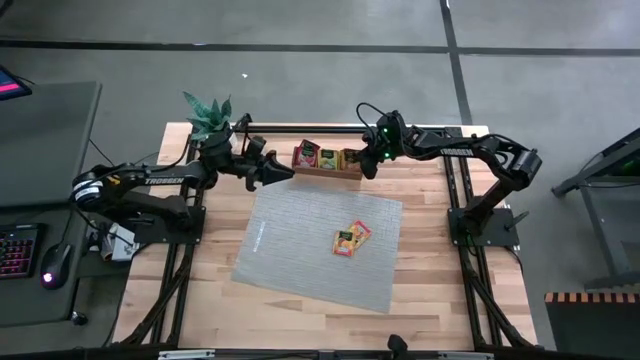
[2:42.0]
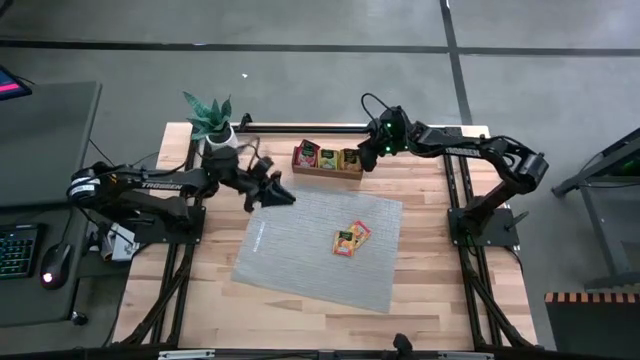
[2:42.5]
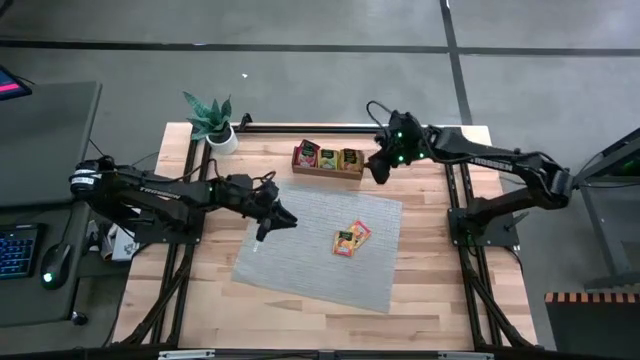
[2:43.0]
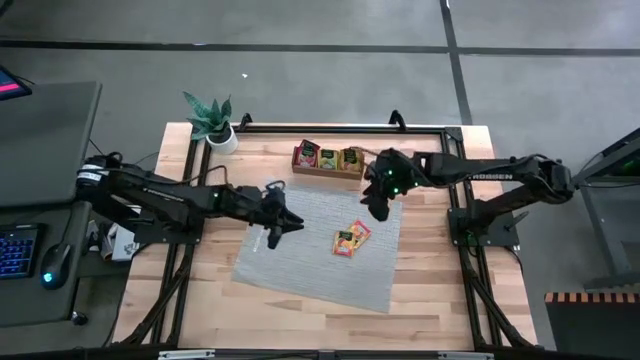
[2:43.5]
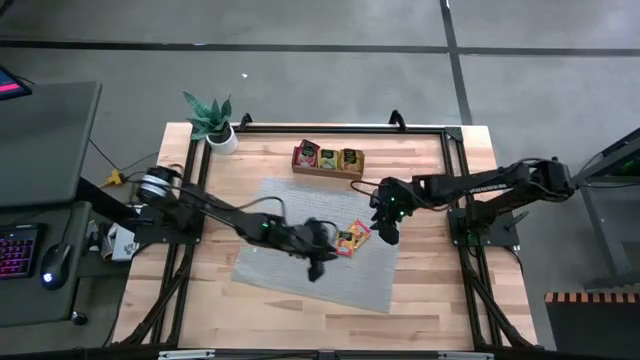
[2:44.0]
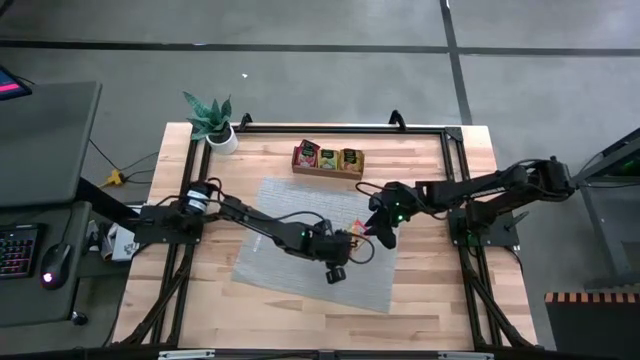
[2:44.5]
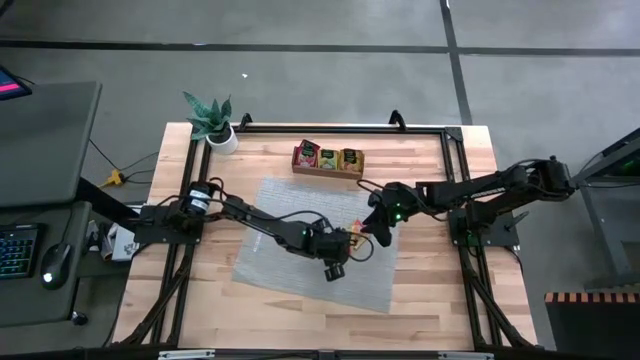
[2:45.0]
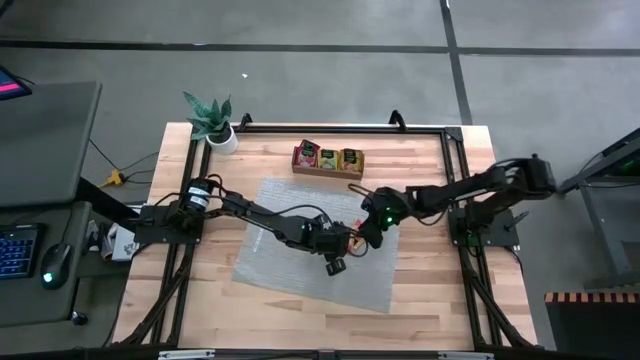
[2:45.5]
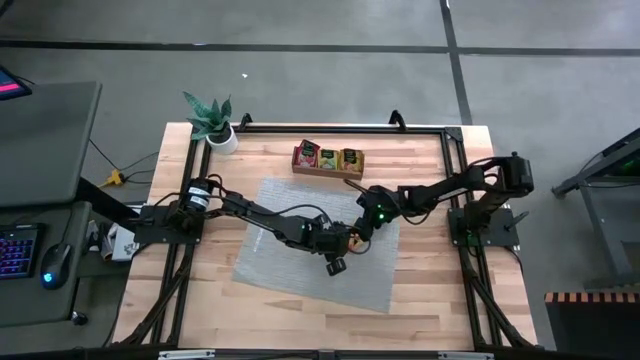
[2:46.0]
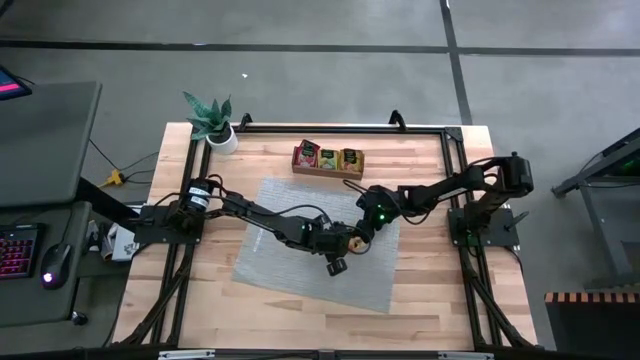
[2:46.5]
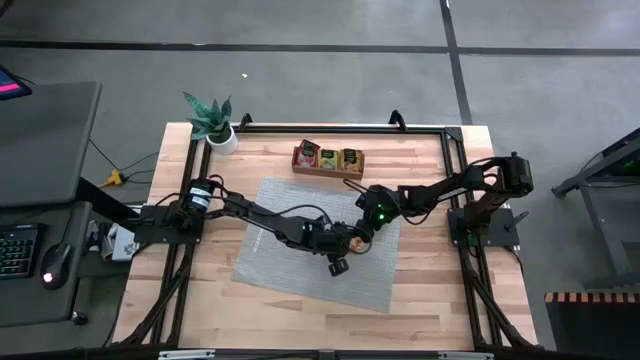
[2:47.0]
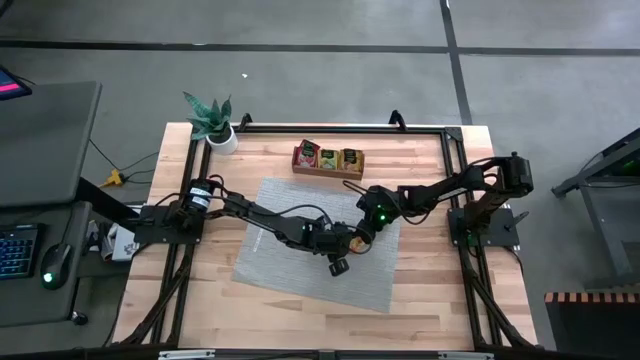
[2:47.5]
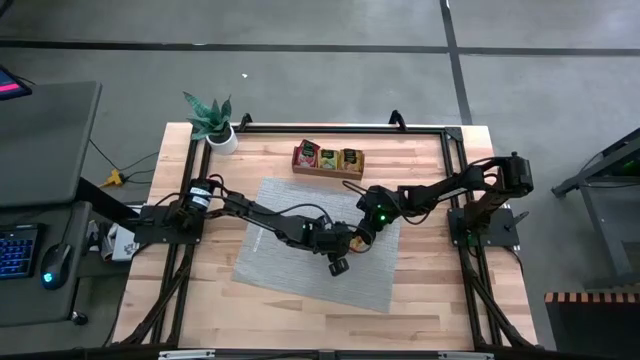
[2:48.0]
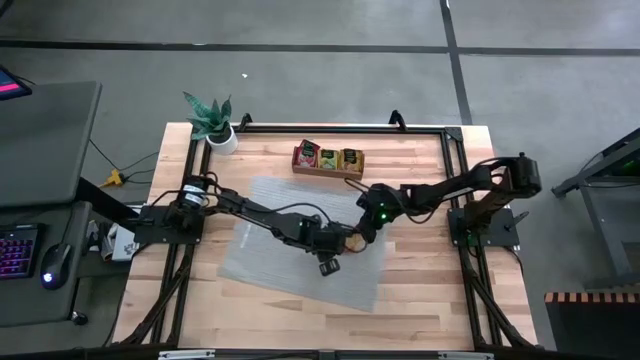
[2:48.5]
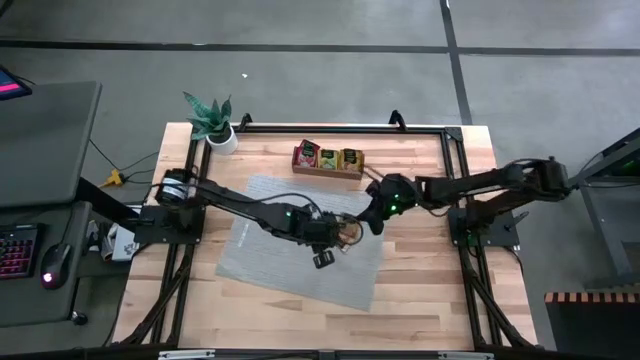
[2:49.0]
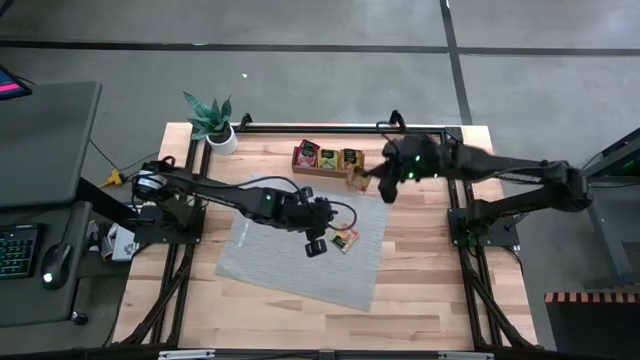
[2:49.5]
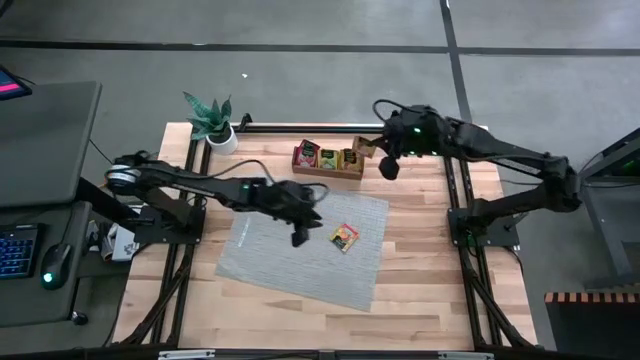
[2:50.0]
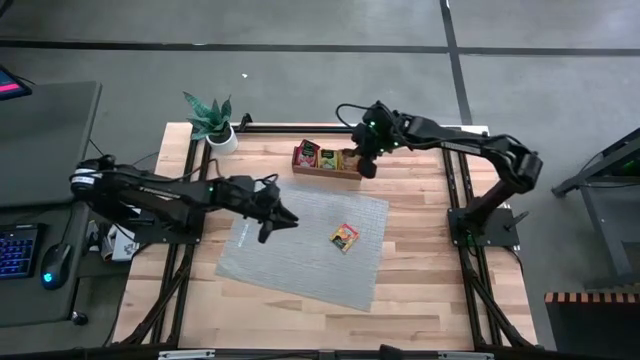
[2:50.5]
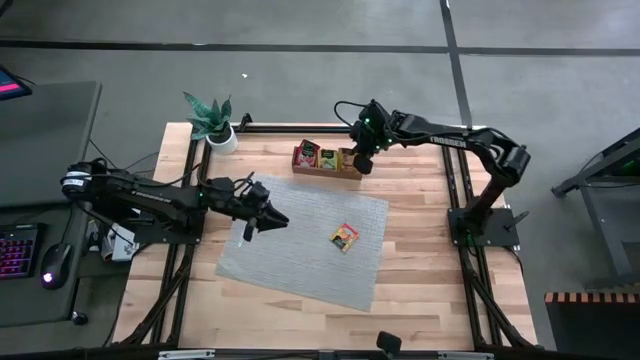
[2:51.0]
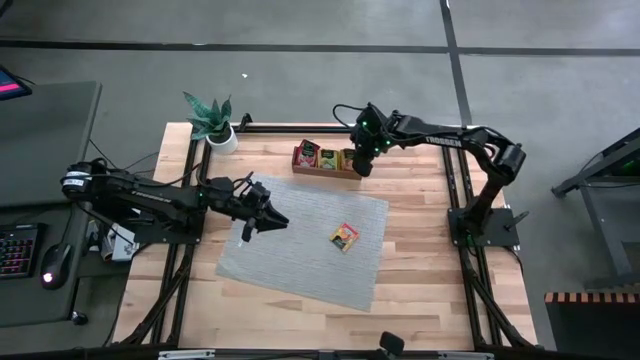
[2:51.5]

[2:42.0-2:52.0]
Task: Pick & Place Tea
Put the orange tea bag into the right section of the wooden organizer

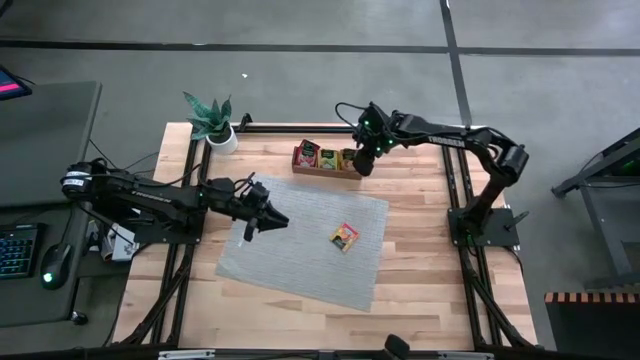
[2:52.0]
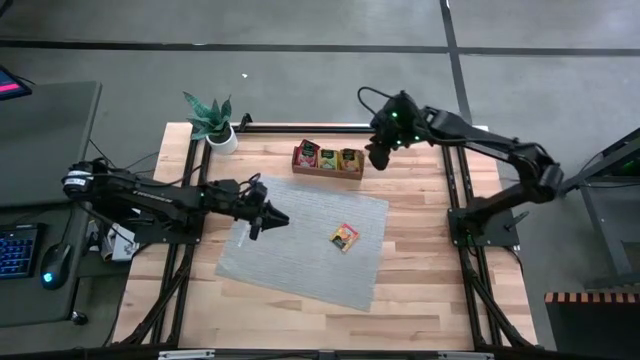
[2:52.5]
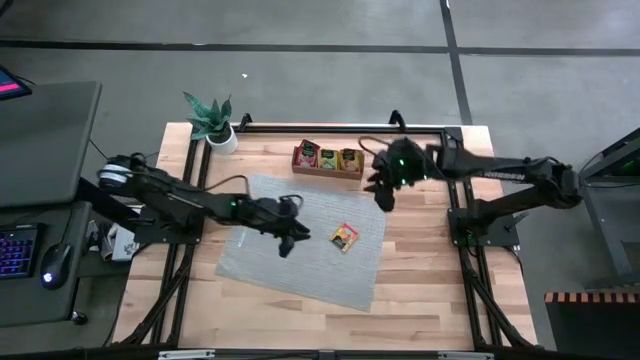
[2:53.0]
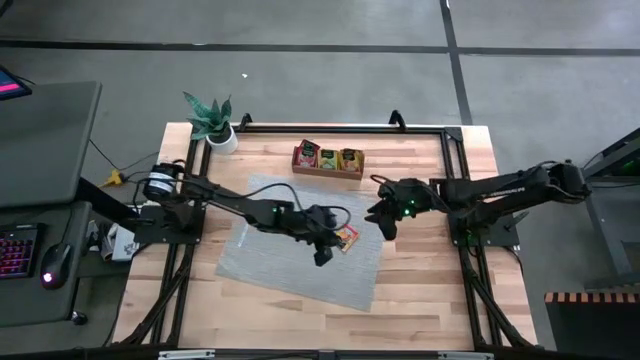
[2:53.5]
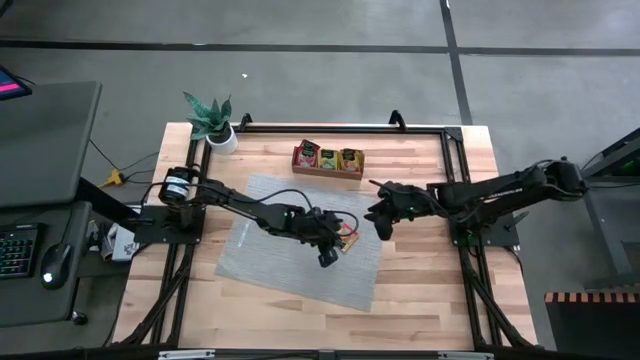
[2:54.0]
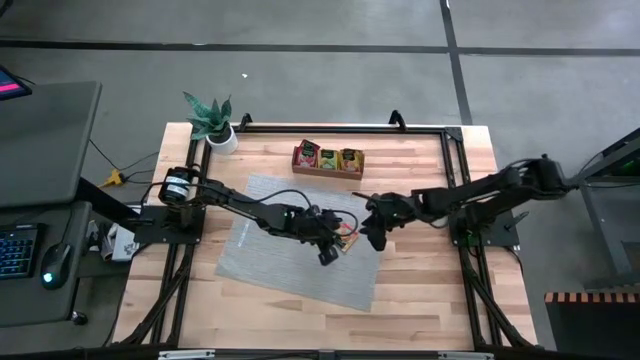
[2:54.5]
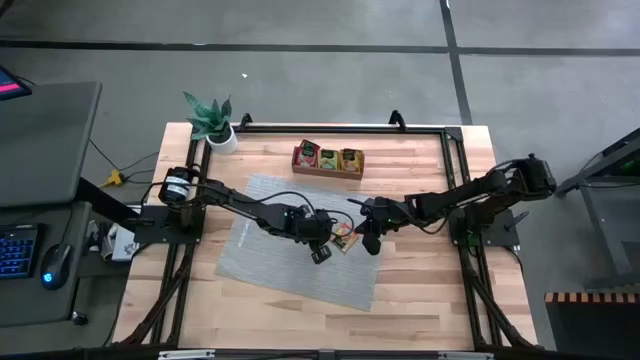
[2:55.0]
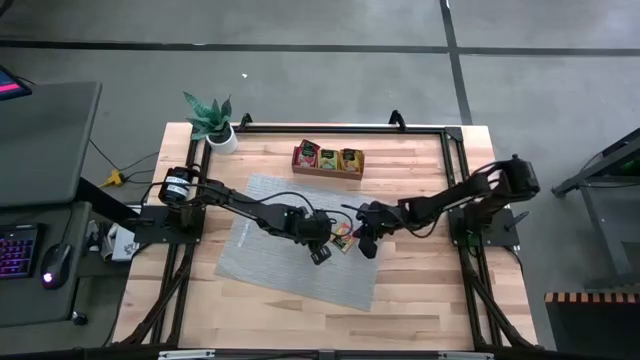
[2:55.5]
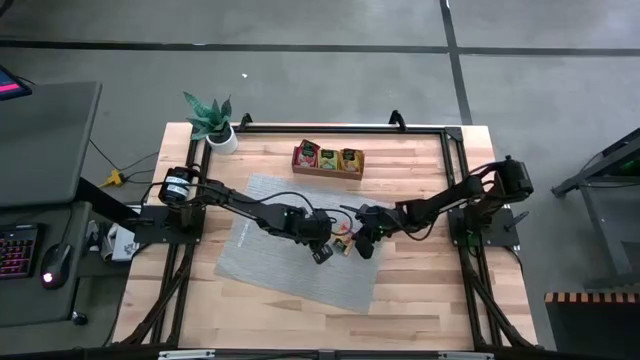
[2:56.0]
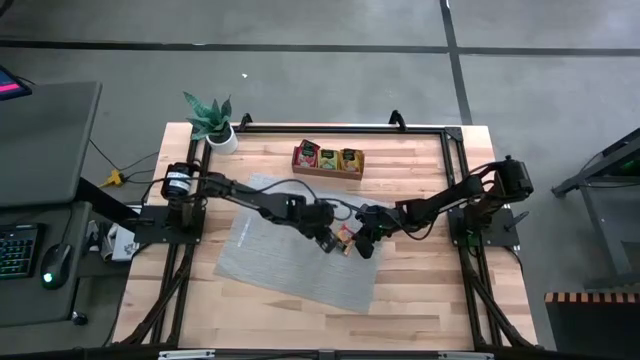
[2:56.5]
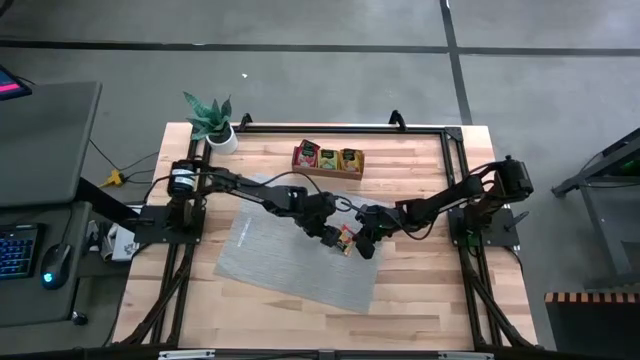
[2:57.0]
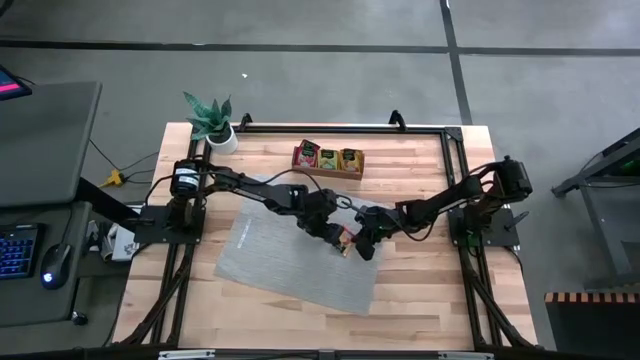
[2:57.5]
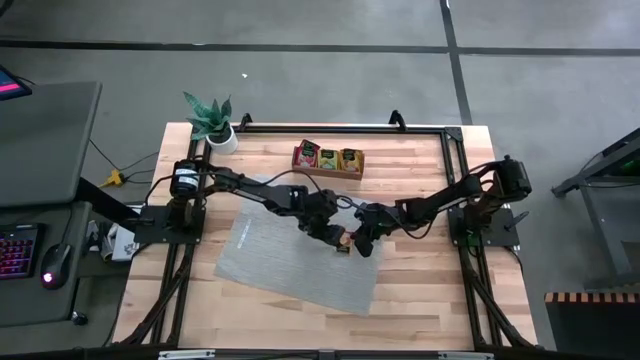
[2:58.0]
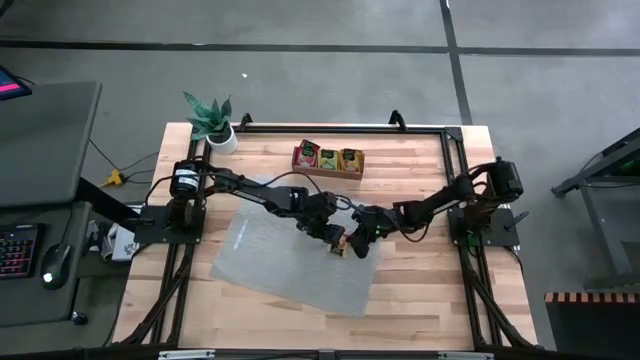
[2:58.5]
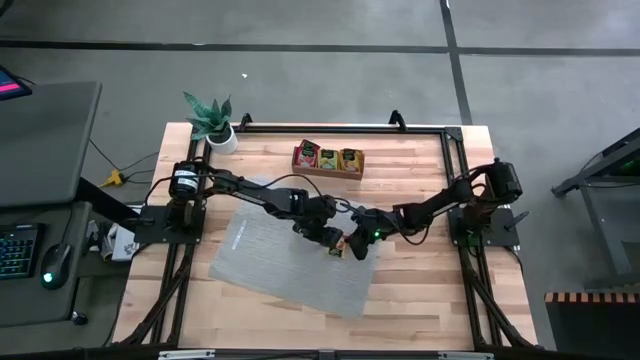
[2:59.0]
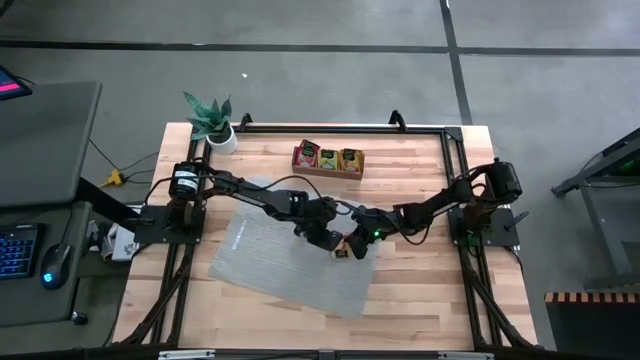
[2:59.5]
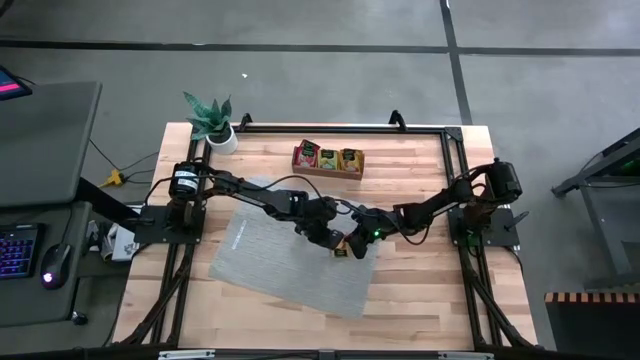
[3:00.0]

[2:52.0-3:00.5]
Put the orange tea bag into the right section of the wooden organizer

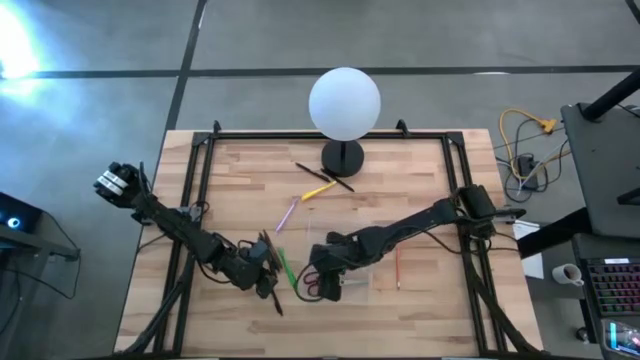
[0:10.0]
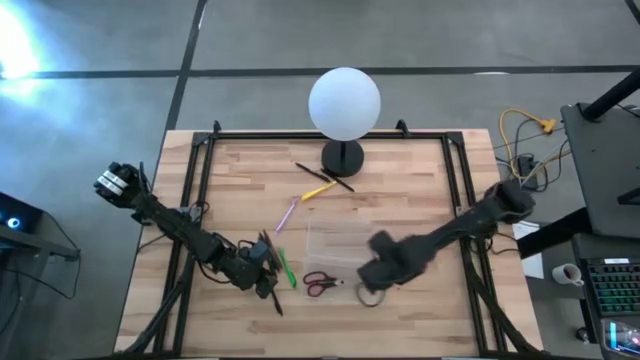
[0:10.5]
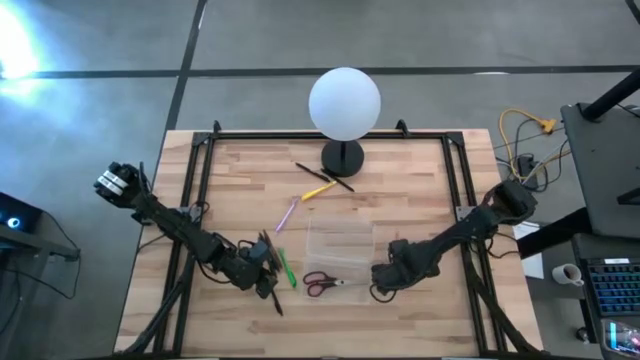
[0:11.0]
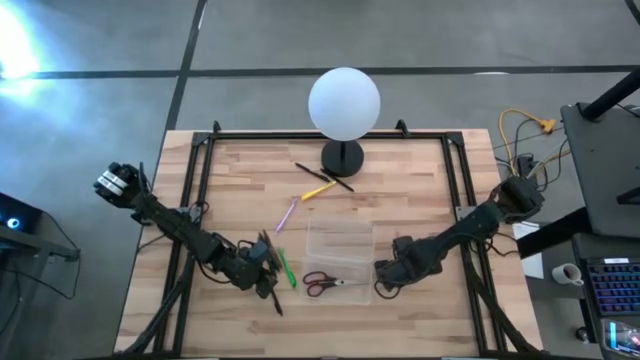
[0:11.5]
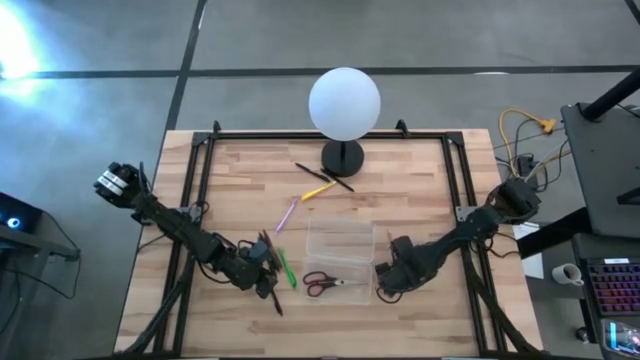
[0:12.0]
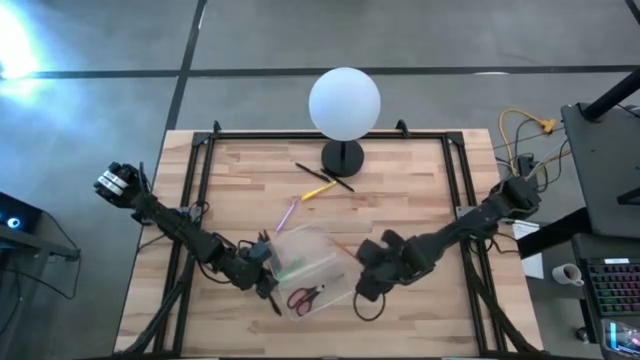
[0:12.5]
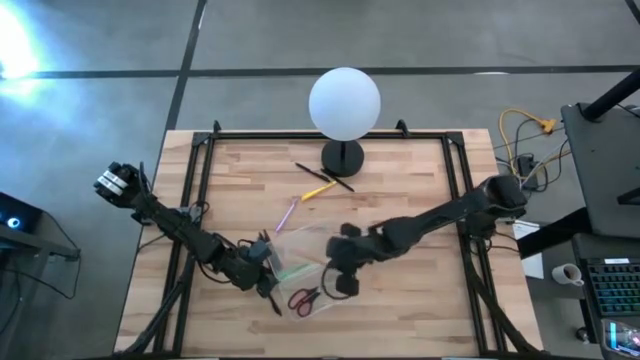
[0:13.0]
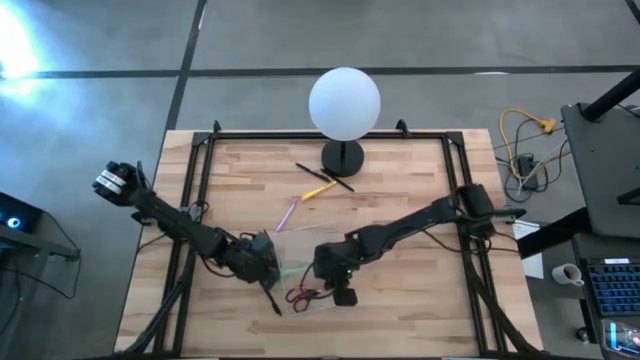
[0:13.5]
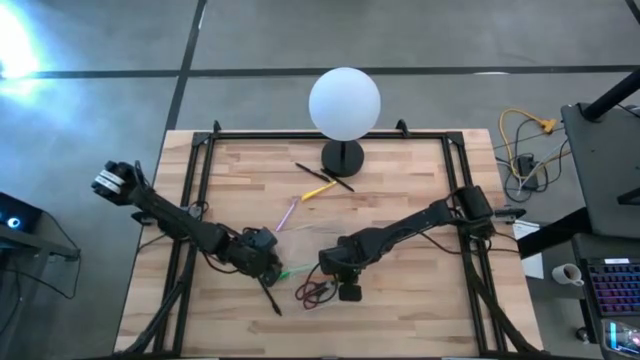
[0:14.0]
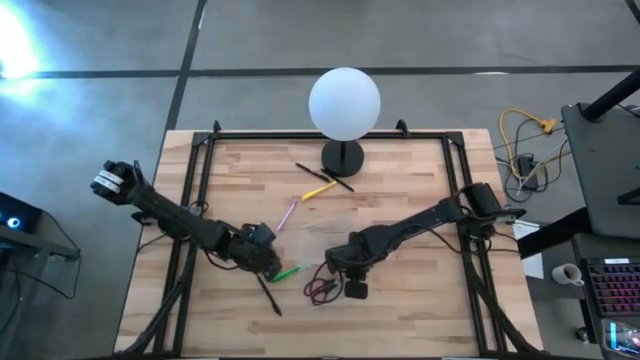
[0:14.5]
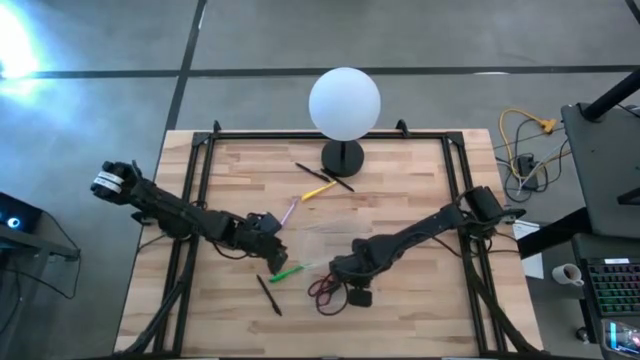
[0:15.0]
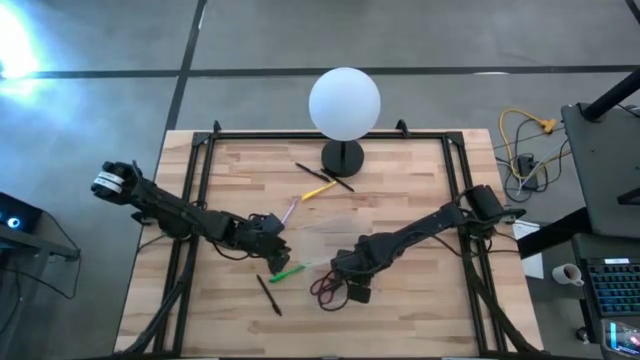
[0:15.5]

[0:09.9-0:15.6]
Task: Pick & place school supplies into a supply box
Put the yellow pencil into the transparent supply box
